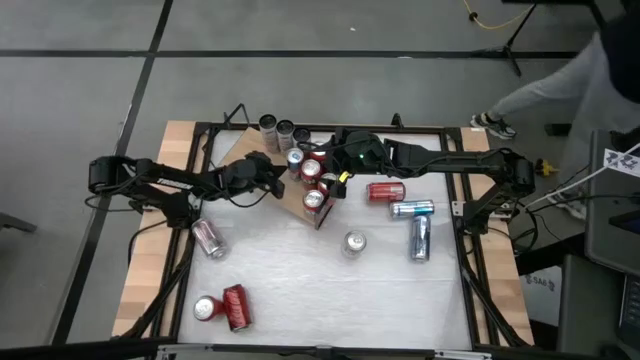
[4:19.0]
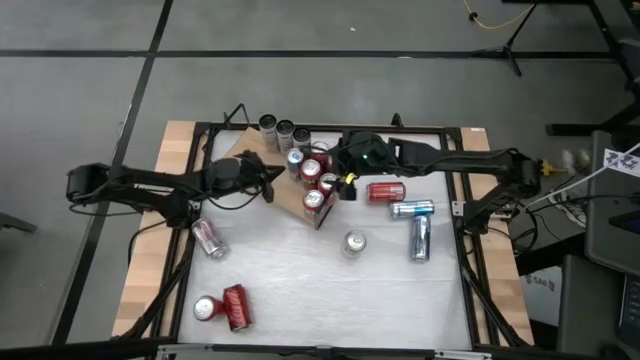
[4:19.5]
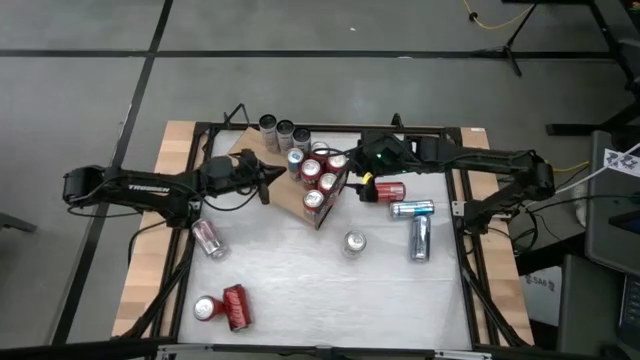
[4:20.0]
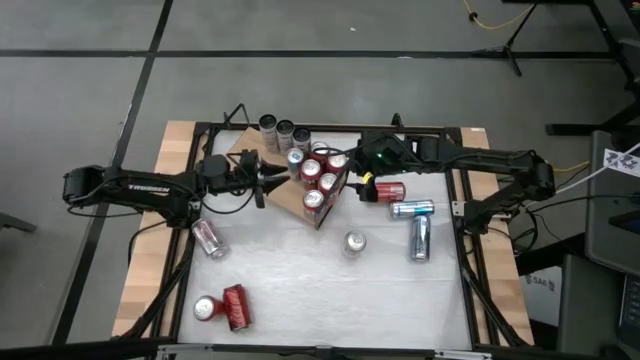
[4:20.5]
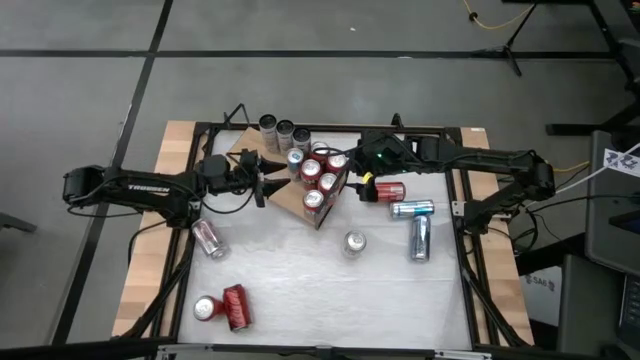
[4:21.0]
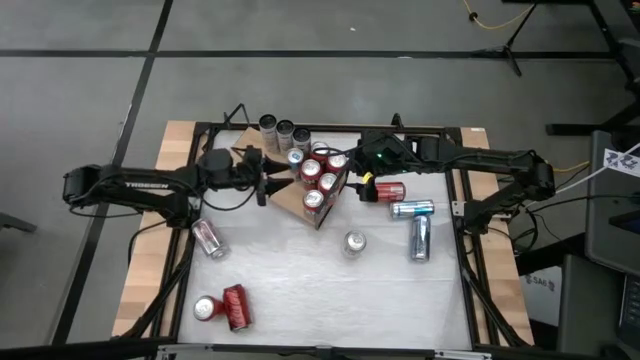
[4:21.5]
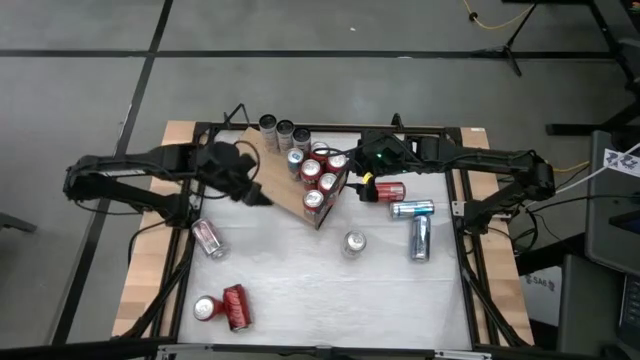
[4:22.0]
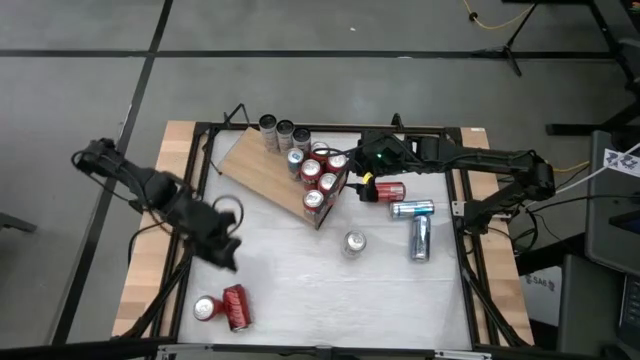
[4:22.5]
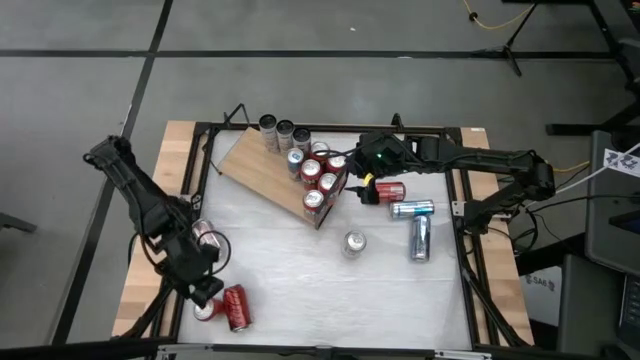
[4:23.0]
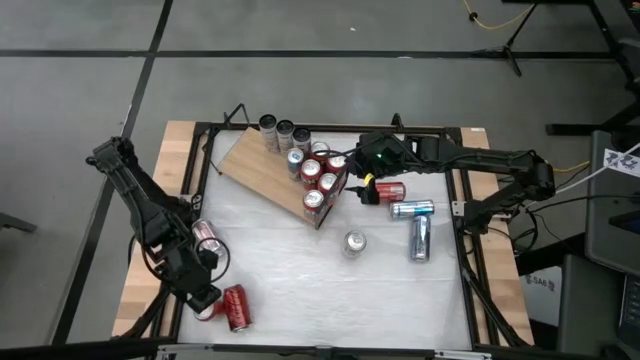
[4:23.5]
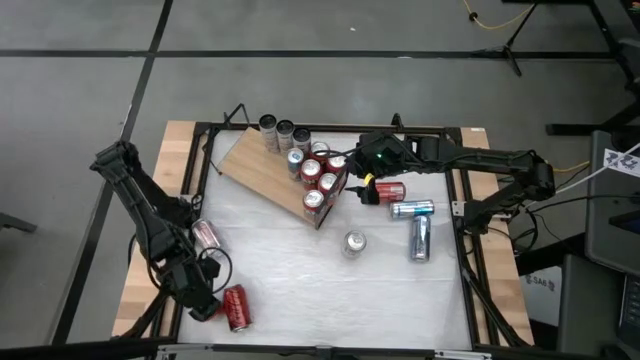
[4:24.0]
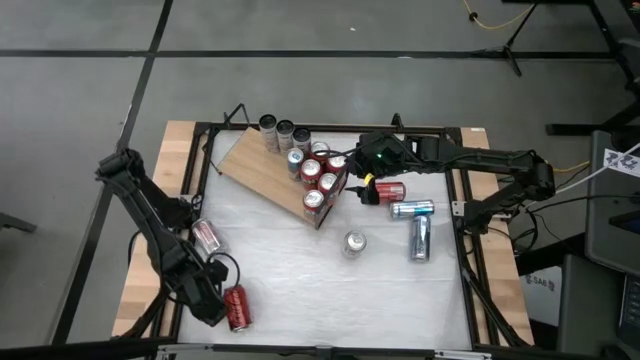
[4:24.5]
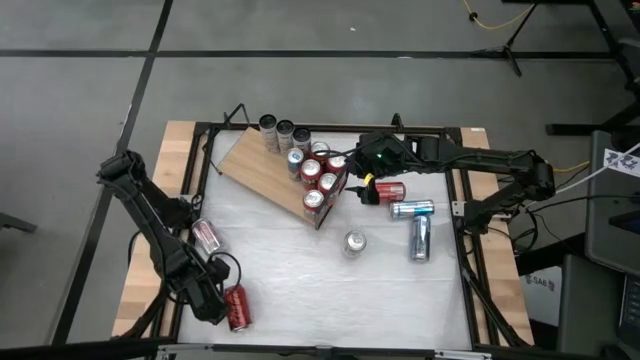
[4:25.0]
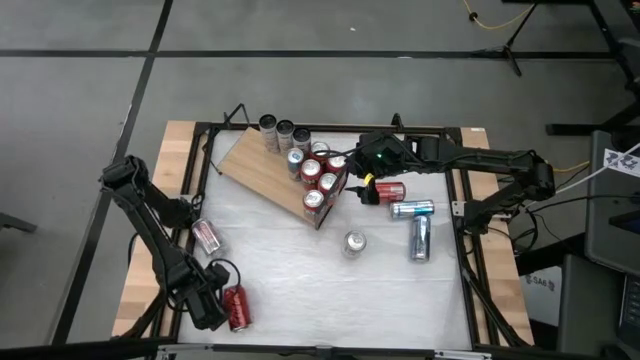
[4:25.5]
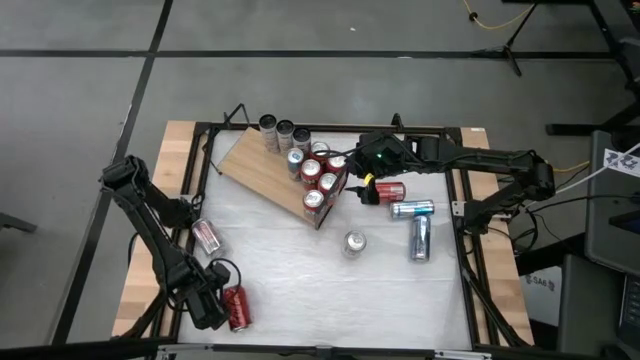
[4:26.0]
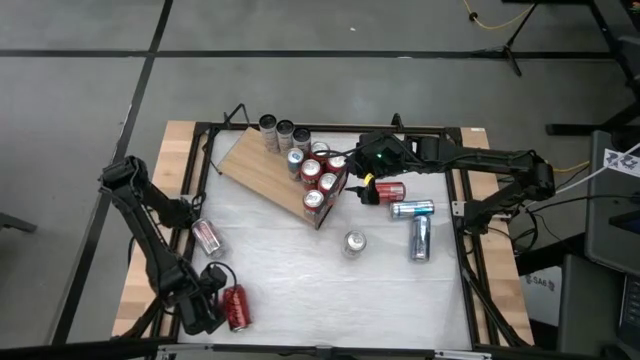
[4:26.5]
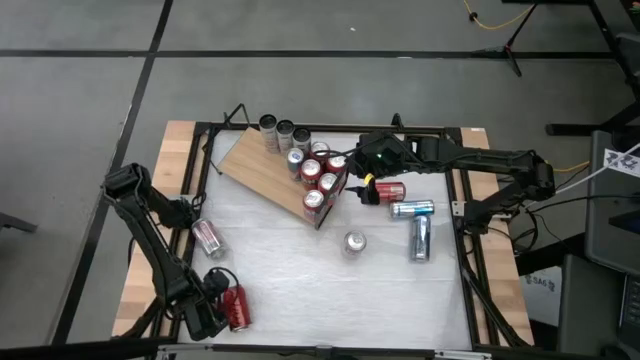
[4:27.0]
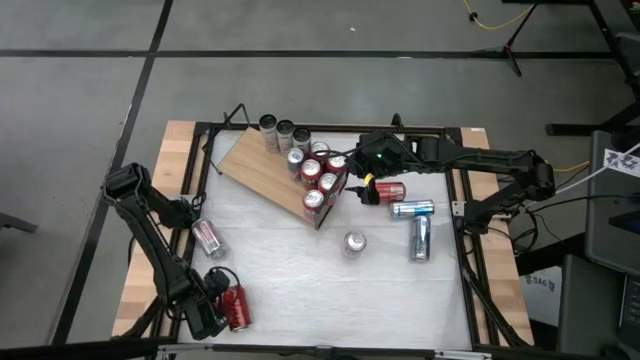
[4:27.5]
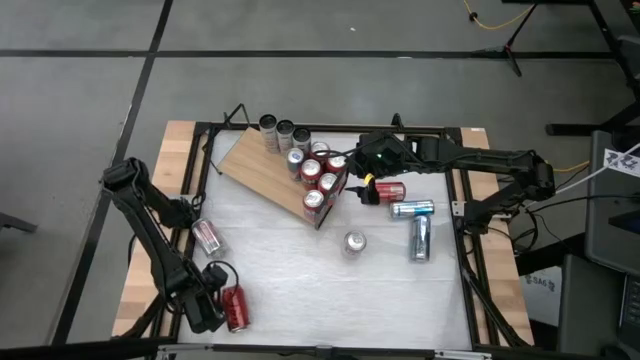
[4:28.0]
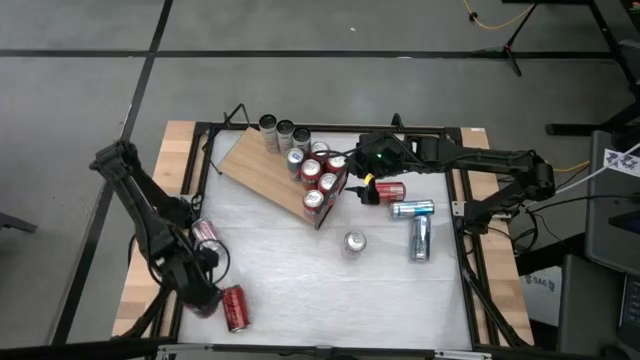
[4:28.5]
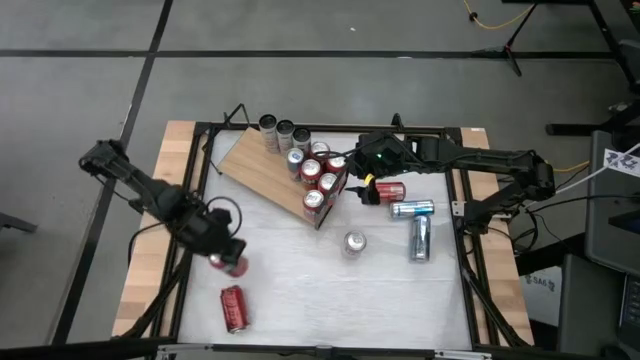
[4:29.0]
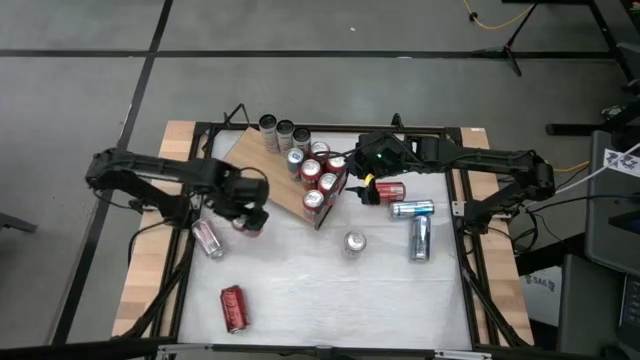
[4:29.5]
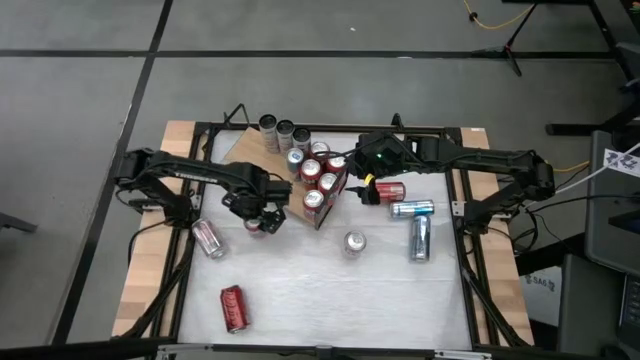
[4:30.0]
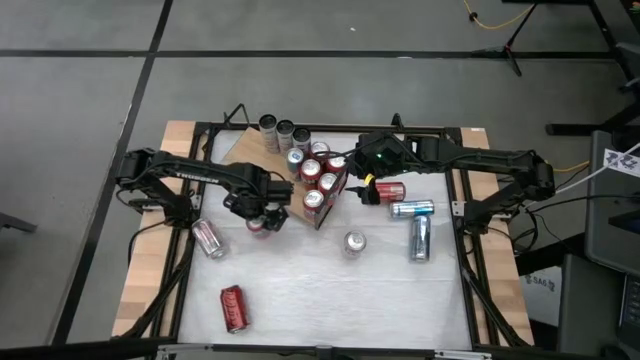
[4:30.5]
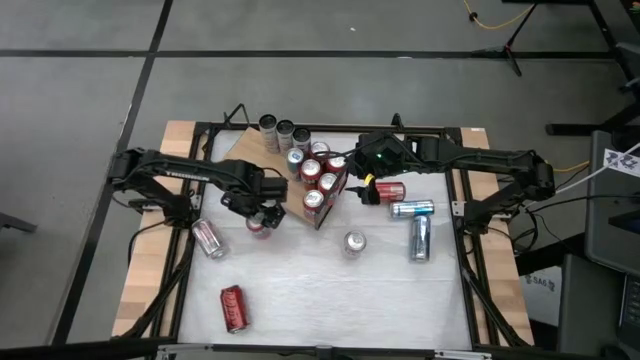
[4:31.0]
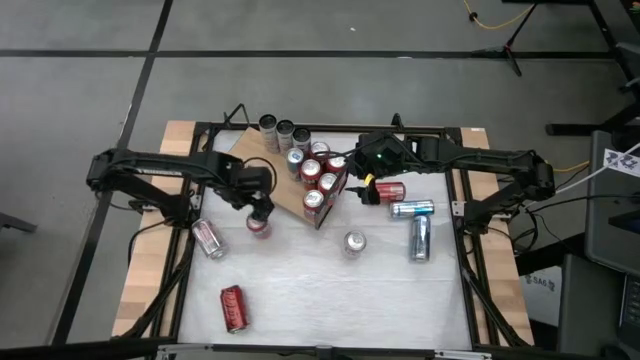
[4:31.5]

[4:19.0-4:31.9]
Task: Pick and place cans onto a shelf
Put the red soda can on the shelf and align with the other red soda cans

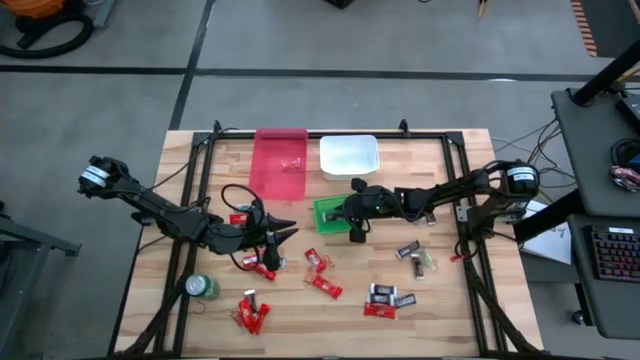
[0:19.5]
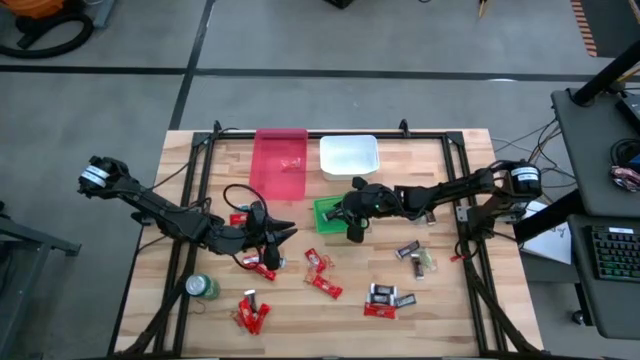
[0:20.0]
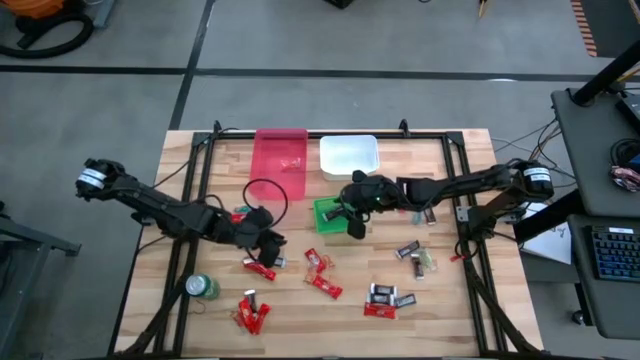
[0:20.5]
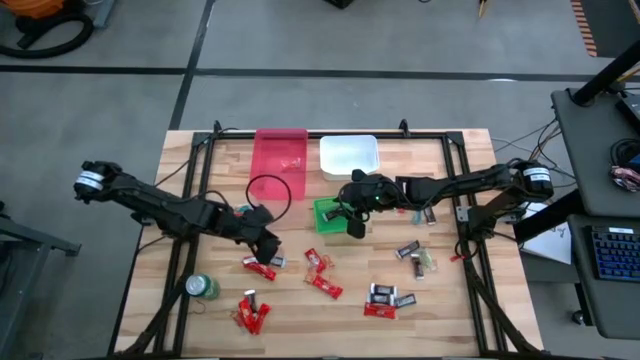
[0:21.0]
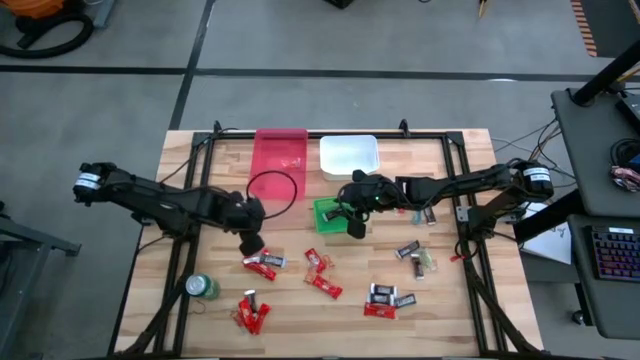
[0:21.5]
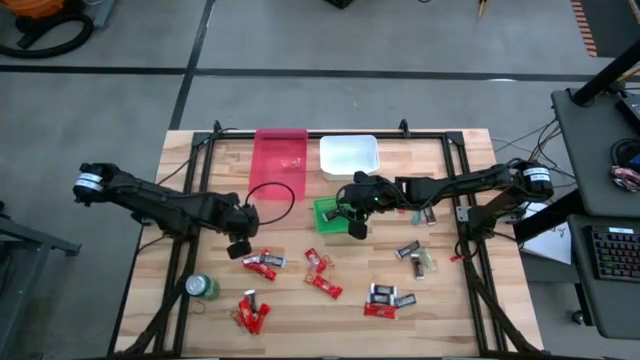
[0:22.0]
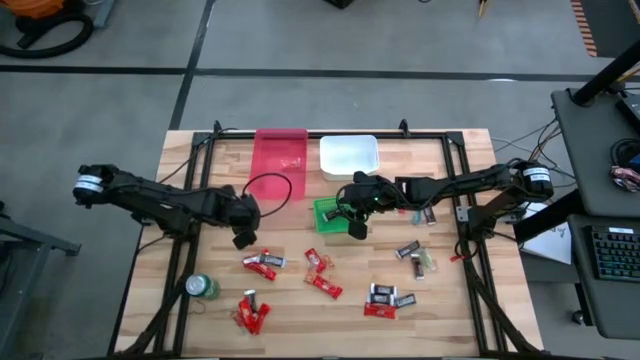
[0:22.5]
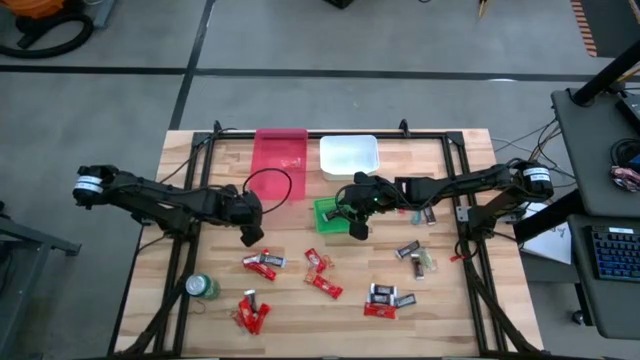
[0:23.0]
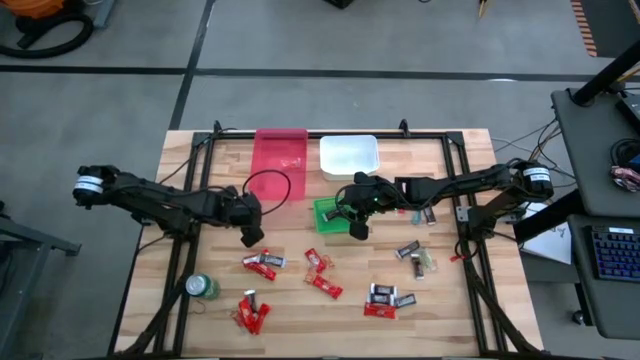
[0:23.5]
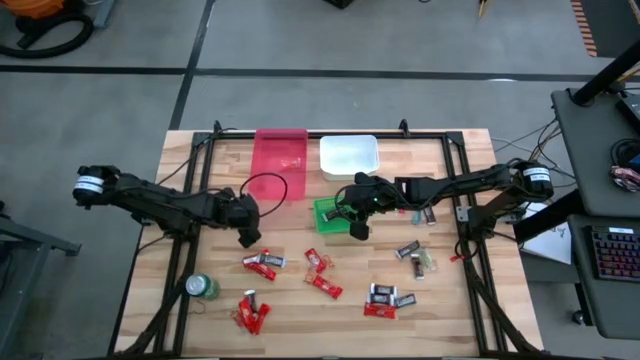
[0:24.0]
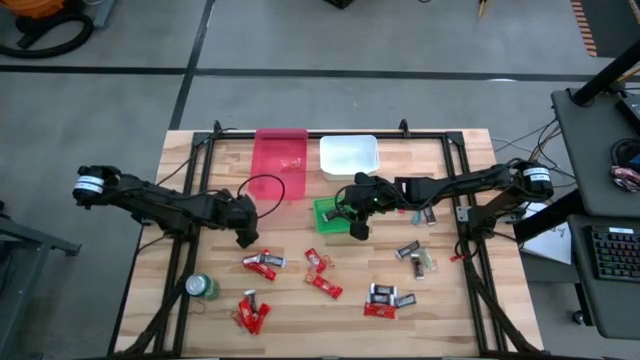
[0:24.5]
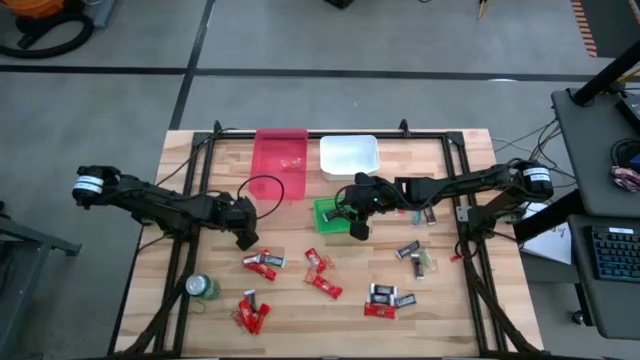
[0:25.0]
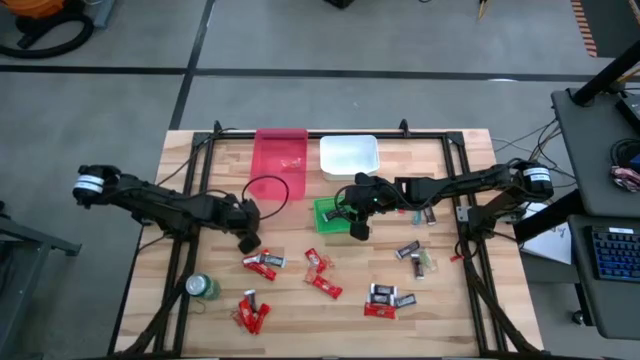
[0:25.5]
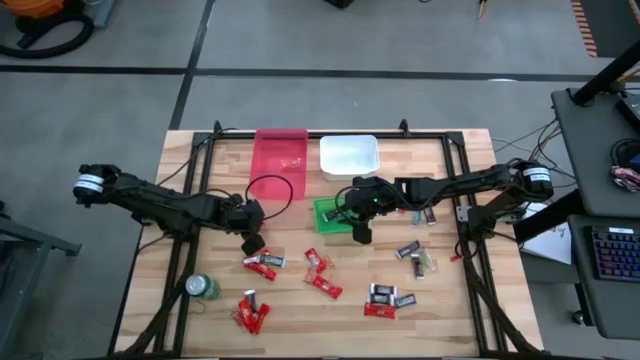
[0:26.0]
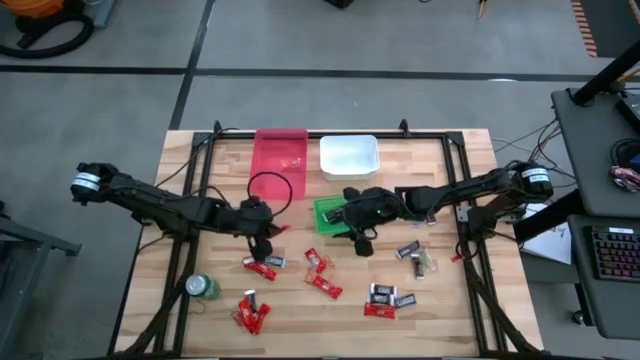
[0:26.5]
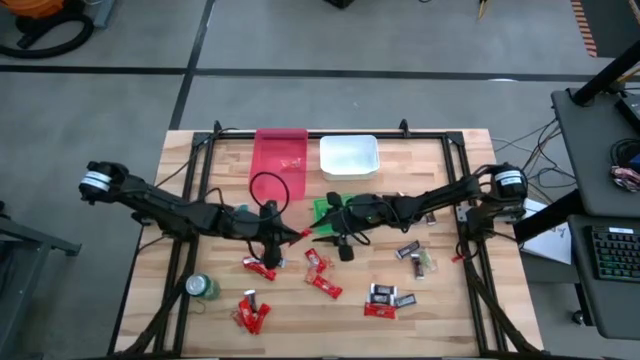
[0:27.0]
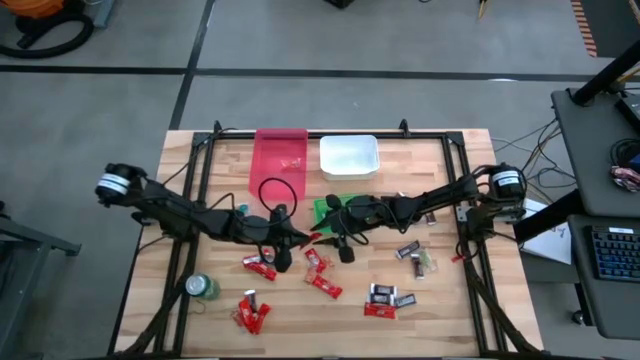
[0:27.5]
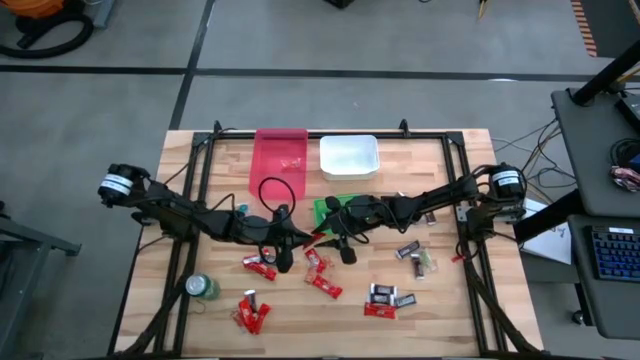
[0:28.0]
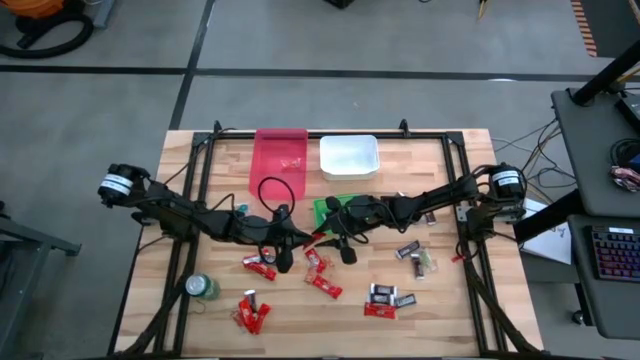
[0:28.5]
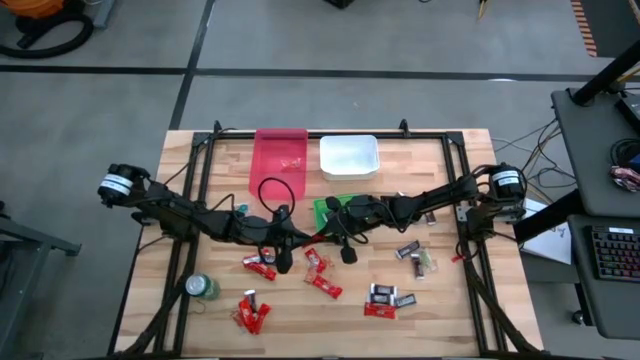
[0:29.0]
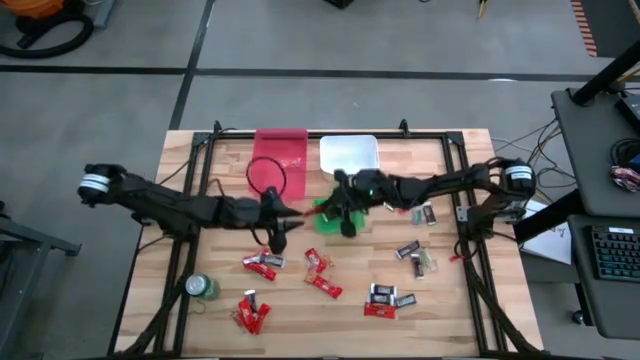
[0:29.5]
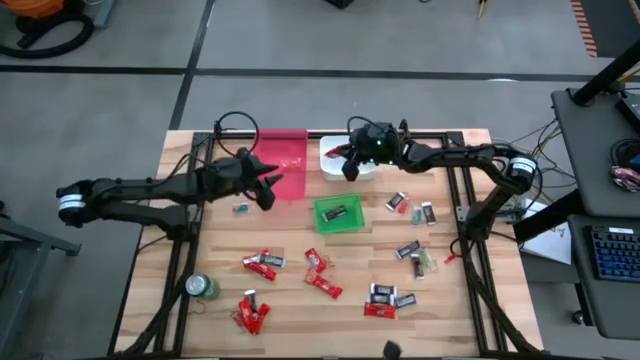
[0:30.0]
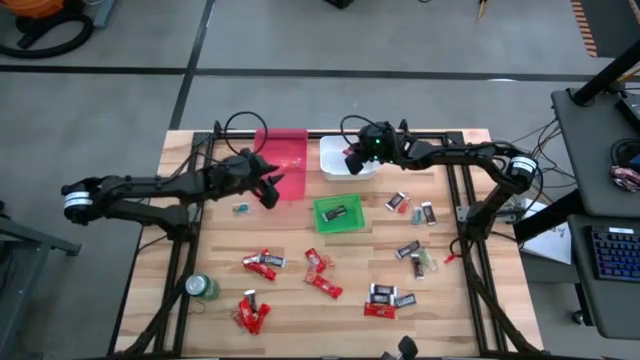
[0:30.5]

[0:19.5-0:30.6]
Task: Sort candy
Put the red chocolate bar into the white bin
